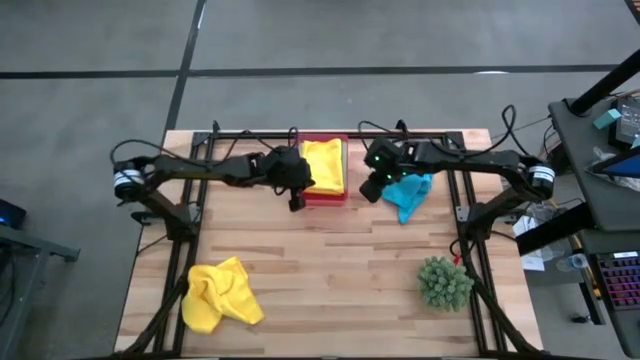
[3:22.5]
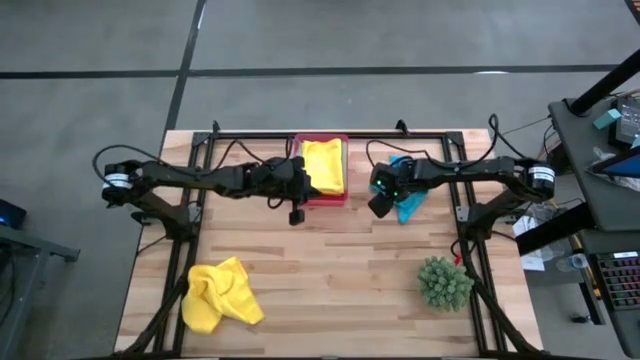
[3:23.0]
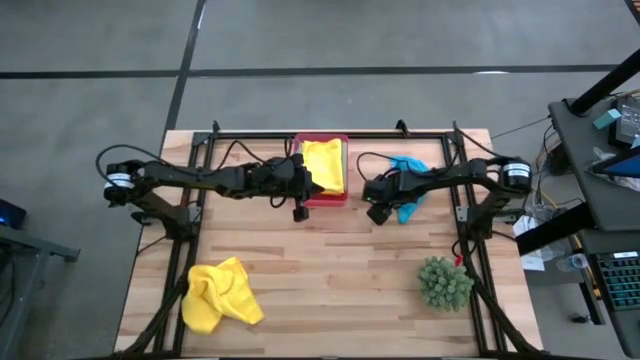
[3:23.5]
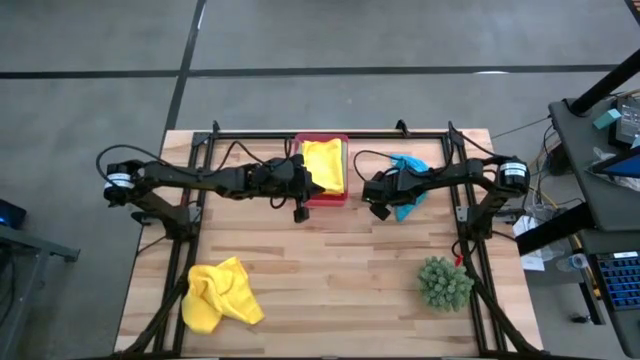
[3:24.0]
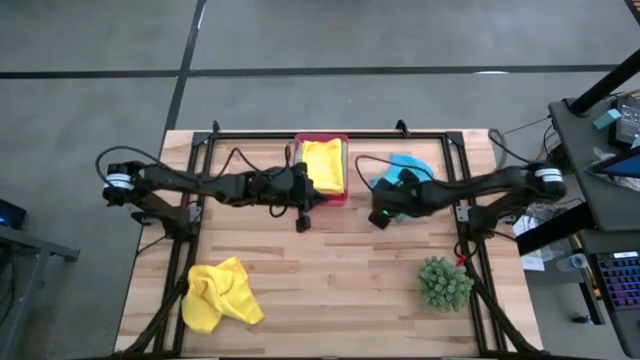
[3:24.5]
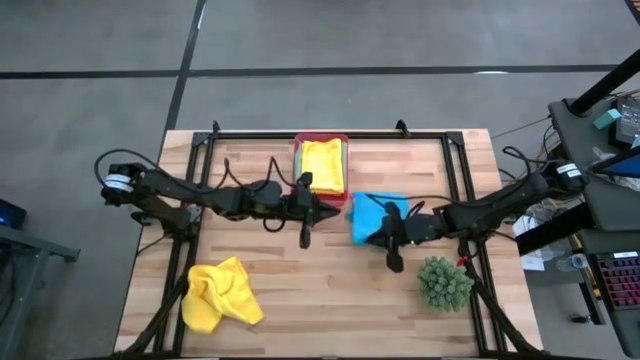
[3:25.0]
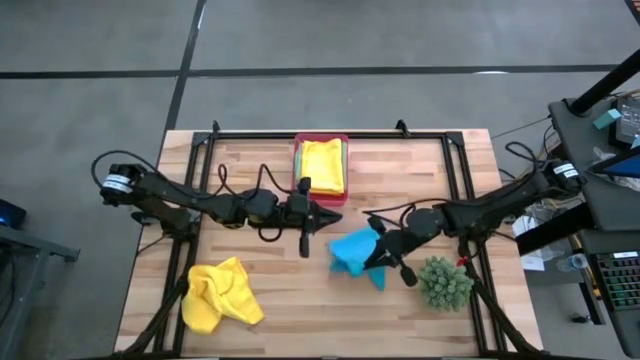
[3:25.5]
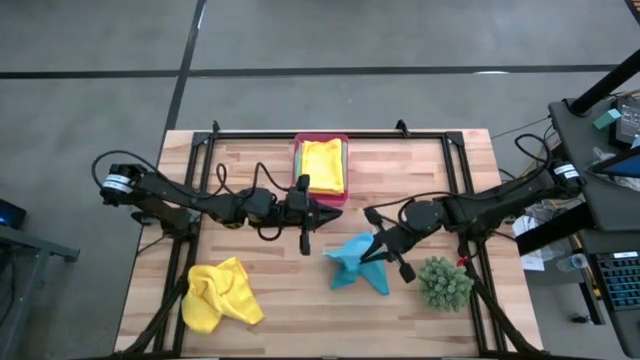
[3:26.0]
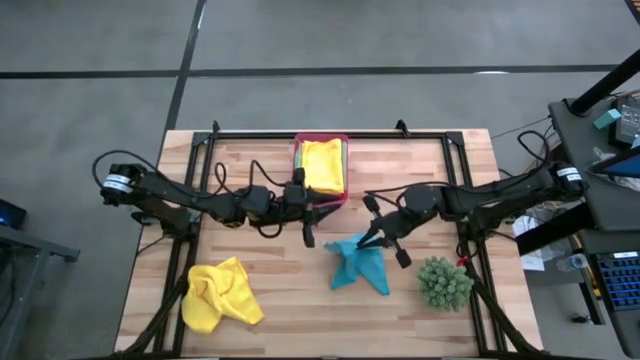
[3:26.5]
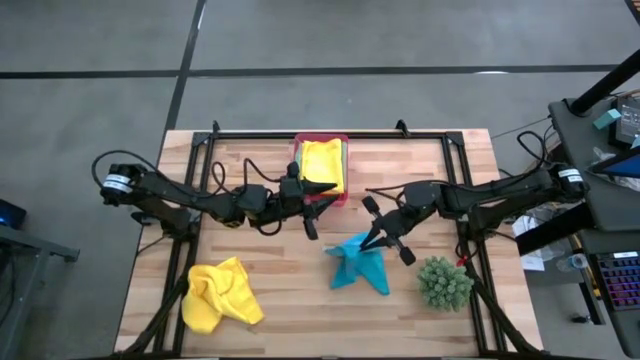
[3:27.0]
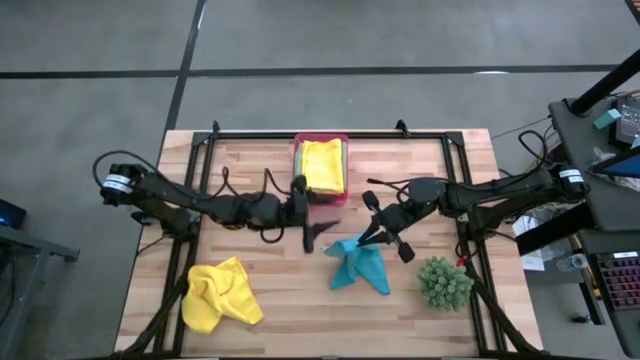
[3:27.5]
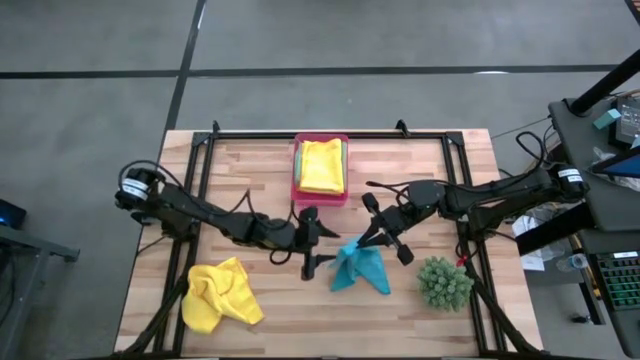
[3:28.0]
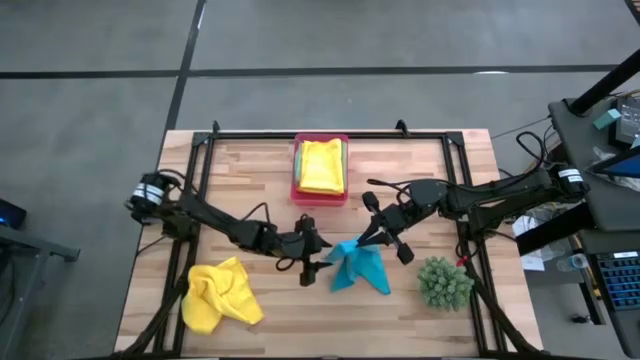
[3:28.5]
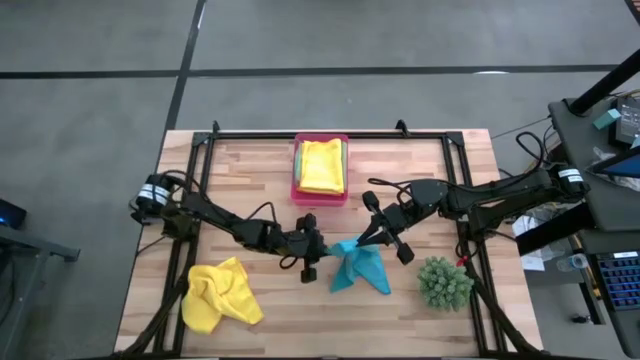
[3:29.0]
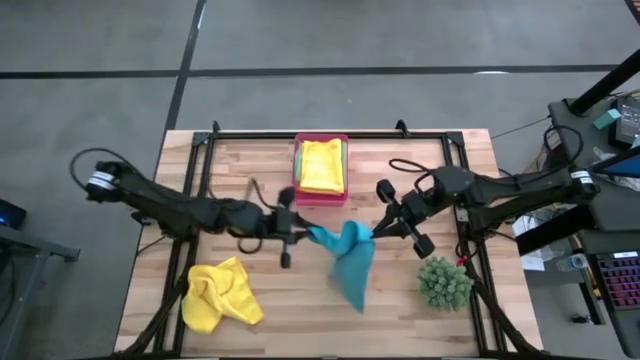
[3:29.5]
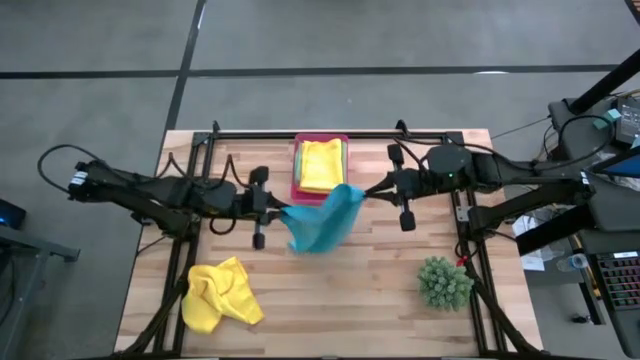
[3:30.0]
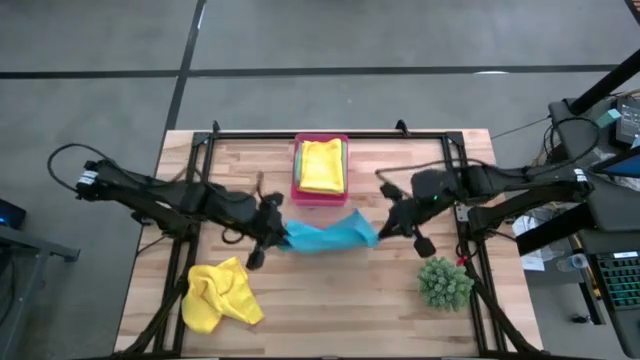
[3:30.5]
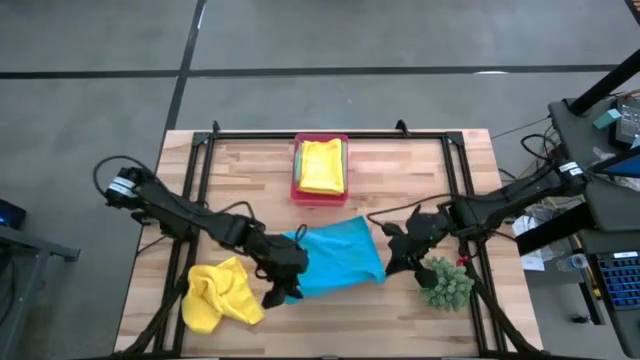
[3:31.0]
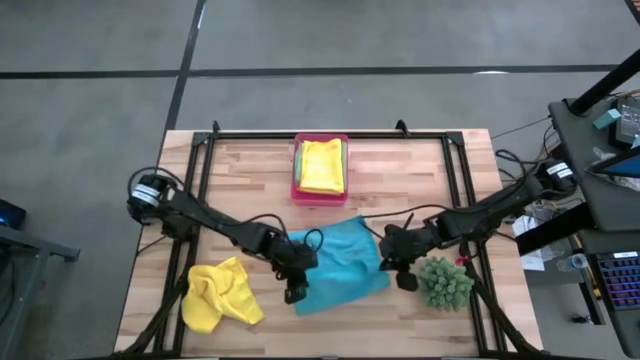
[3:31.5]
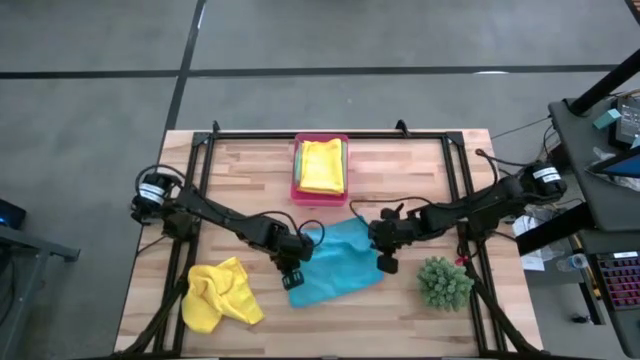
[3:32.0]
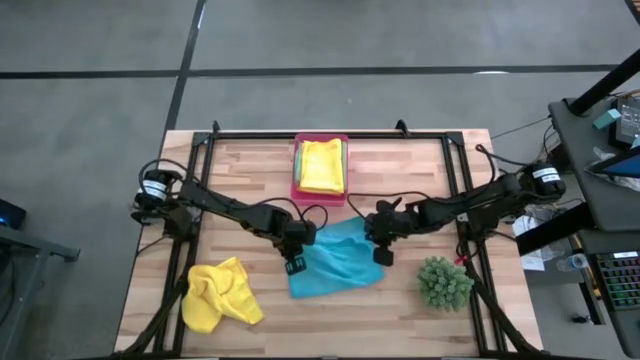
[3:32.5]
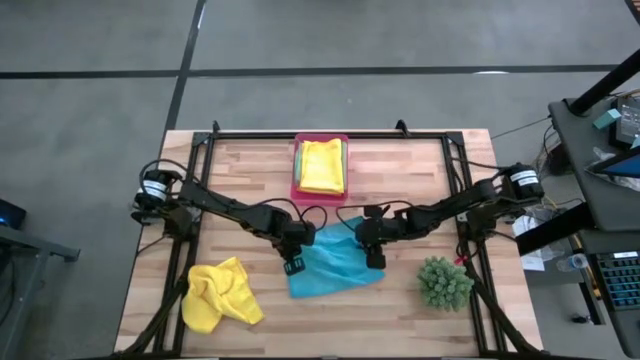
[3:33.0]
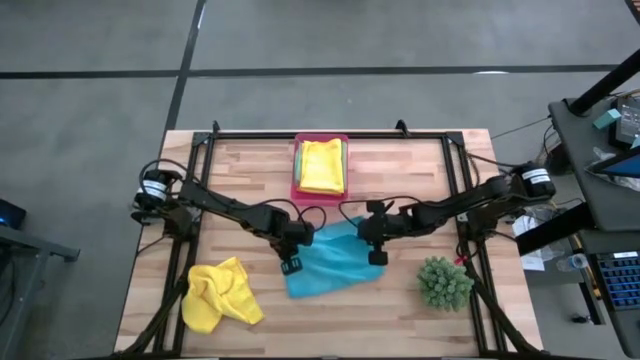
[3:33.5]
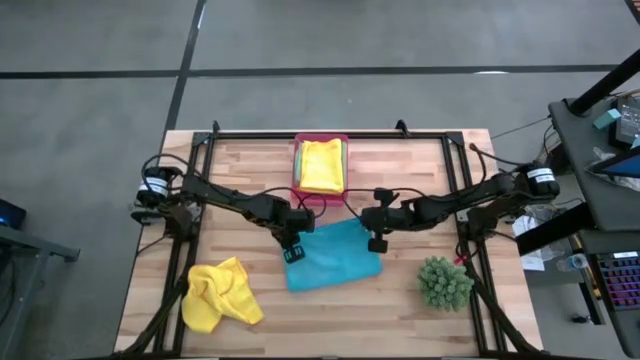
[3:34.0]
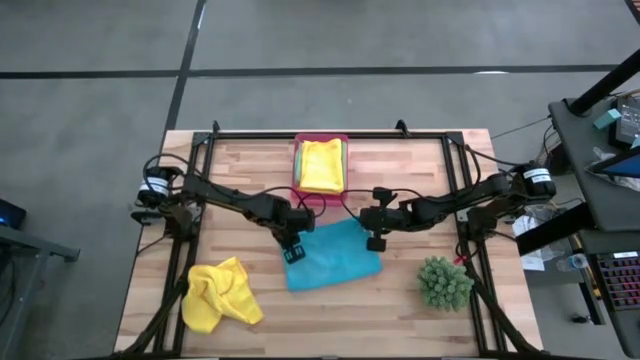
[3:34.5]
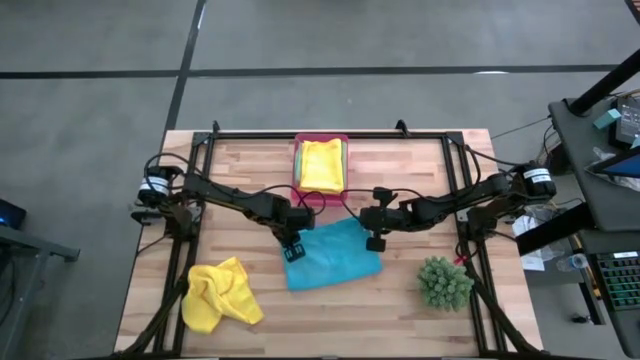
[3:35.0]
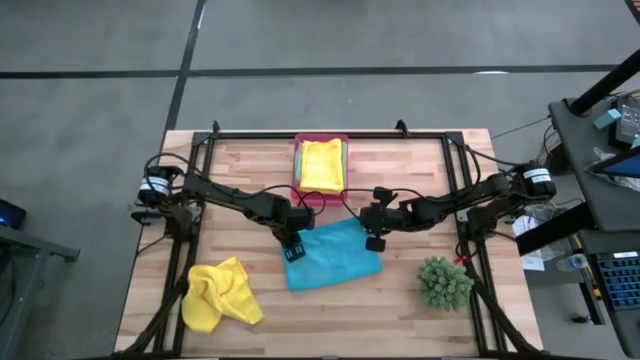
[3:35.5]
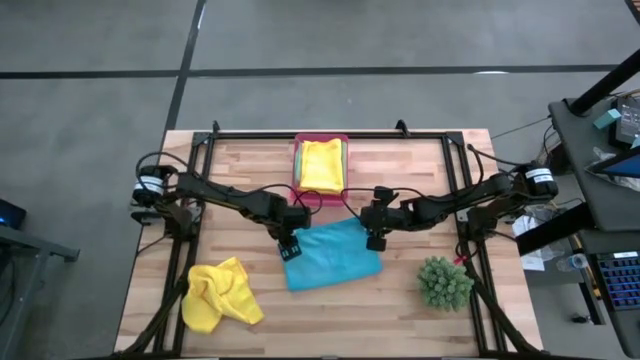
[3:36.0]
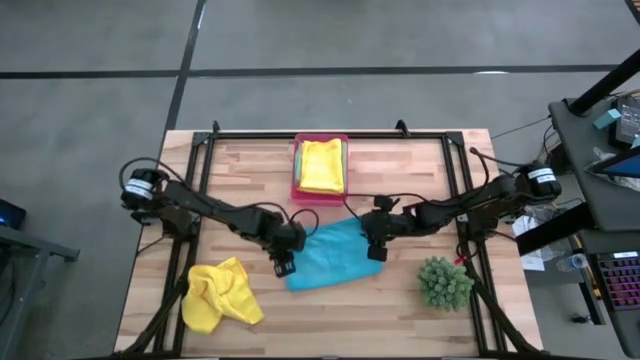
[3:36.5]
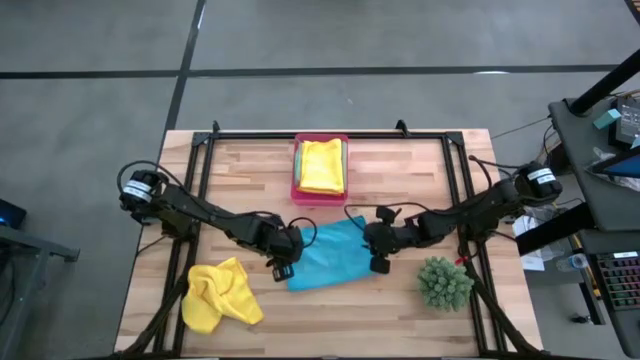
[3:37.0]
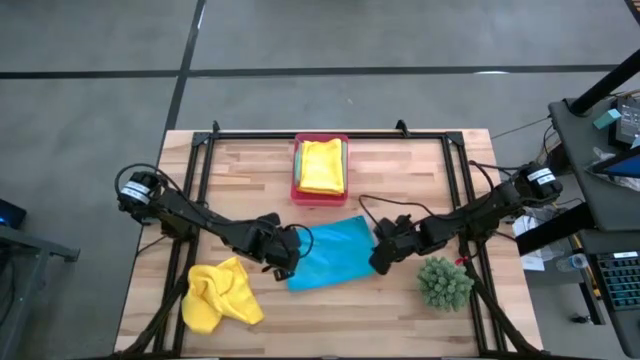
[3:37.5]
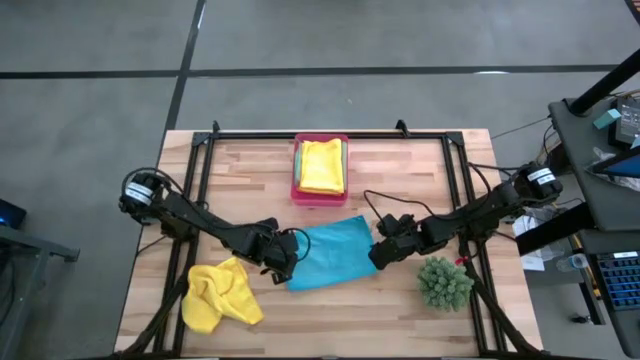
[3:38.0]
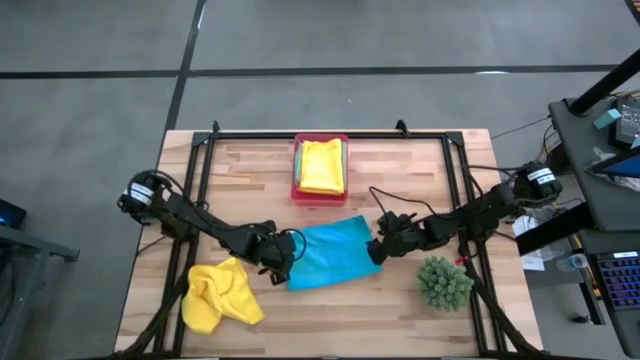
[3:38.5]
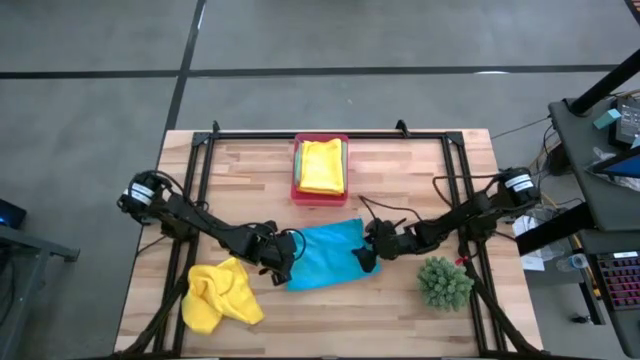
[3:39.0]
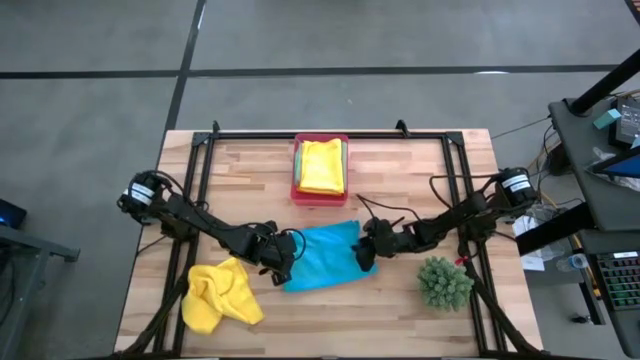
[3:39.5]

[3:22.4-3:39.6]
Task: Fold microfiber towels
Fold the blue towel
